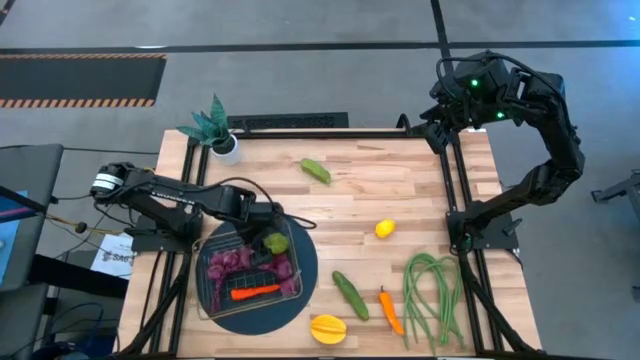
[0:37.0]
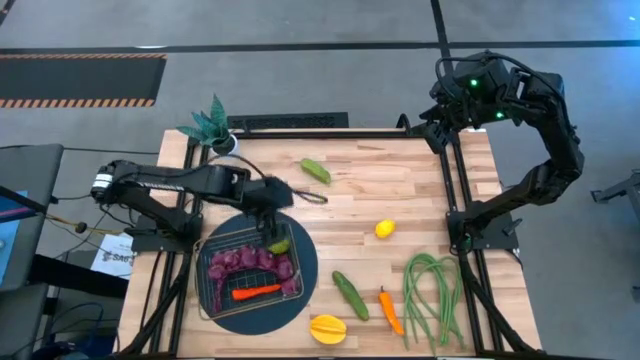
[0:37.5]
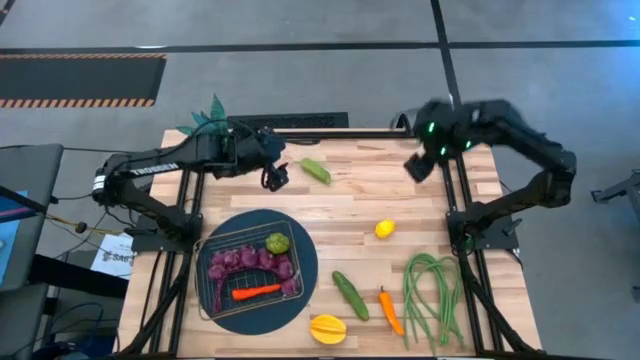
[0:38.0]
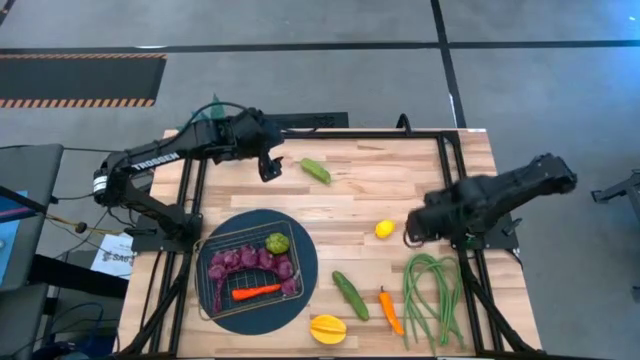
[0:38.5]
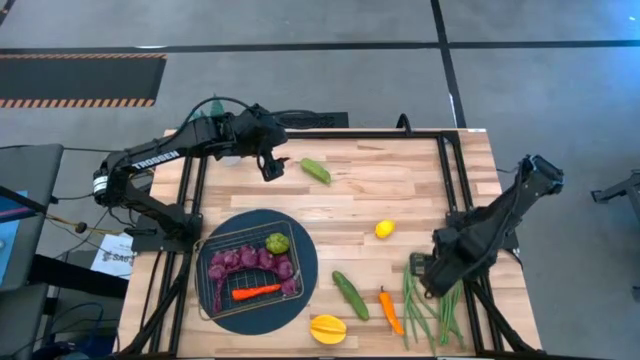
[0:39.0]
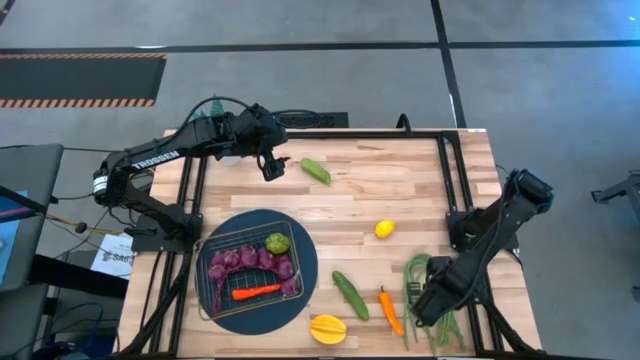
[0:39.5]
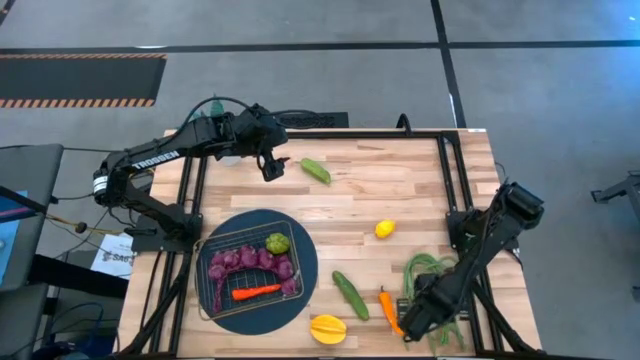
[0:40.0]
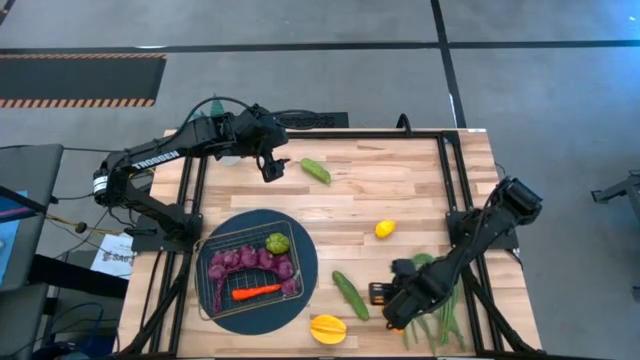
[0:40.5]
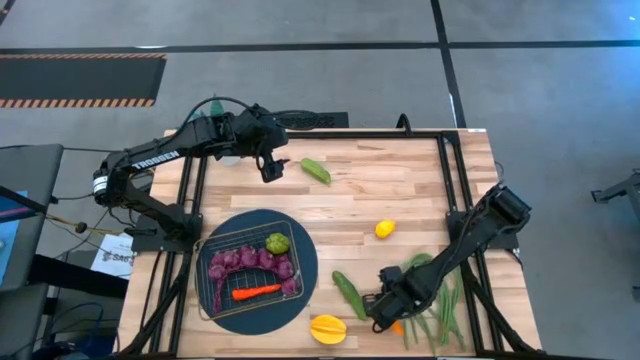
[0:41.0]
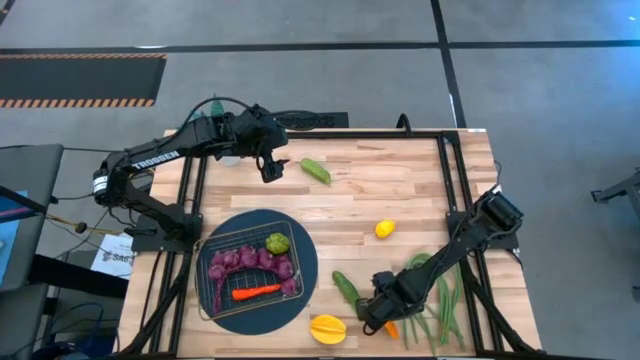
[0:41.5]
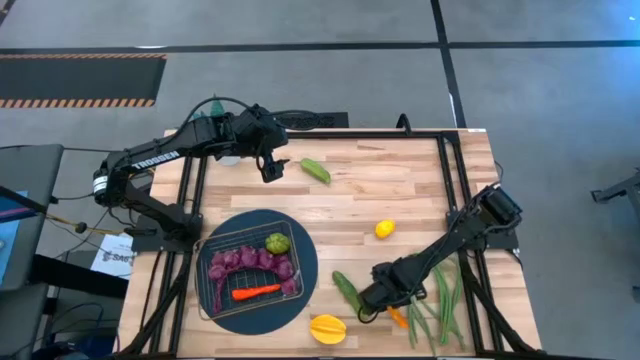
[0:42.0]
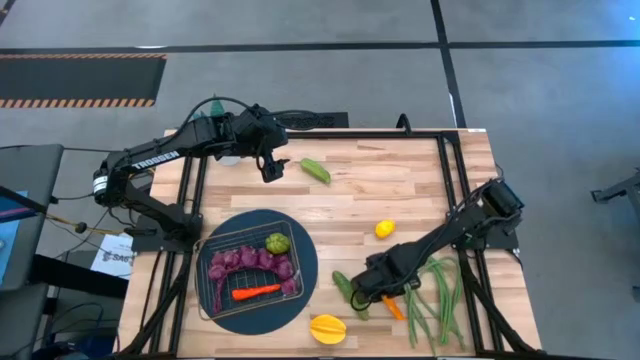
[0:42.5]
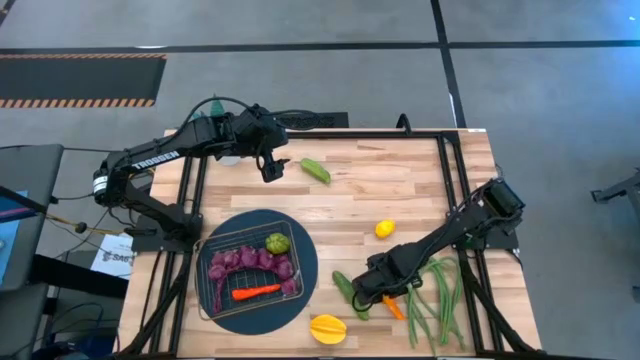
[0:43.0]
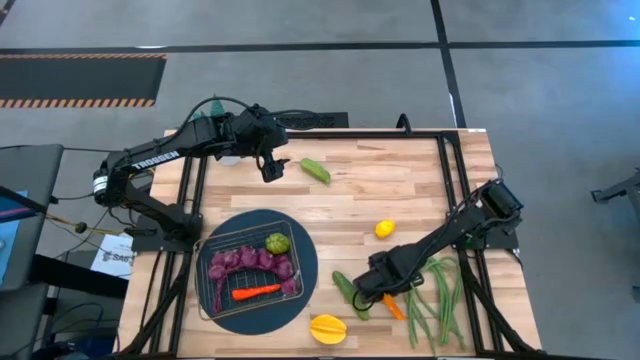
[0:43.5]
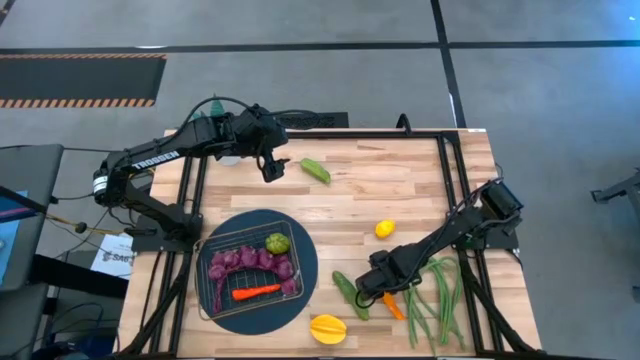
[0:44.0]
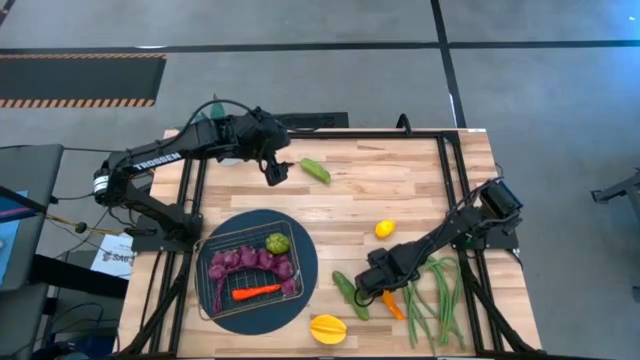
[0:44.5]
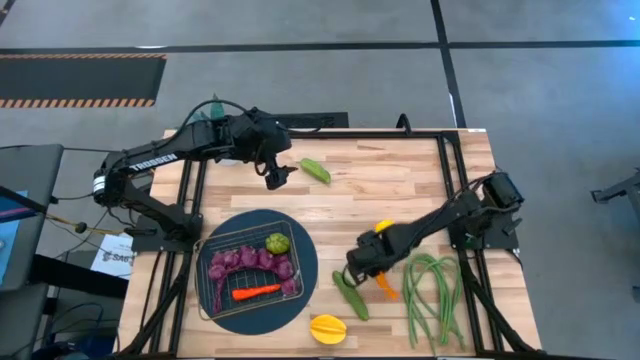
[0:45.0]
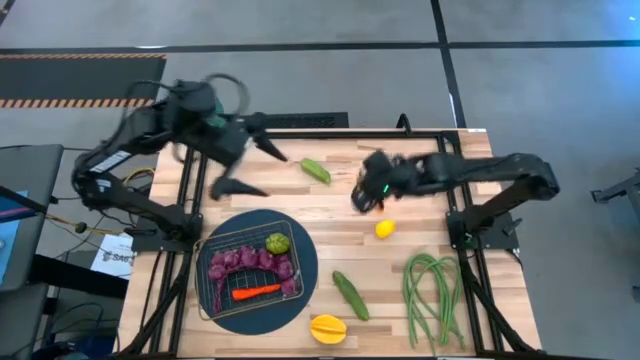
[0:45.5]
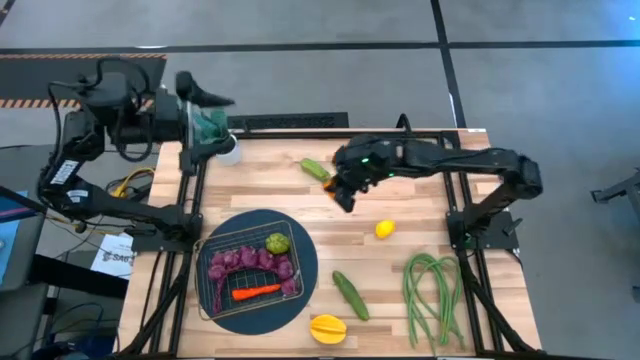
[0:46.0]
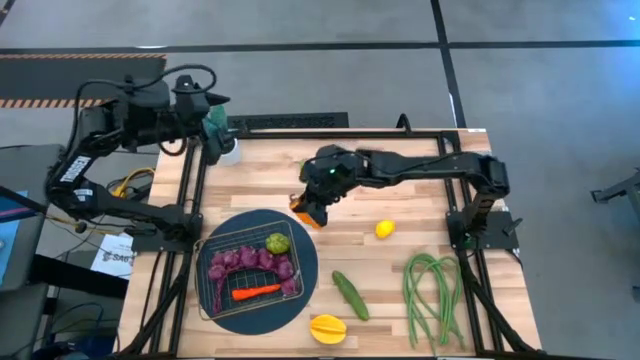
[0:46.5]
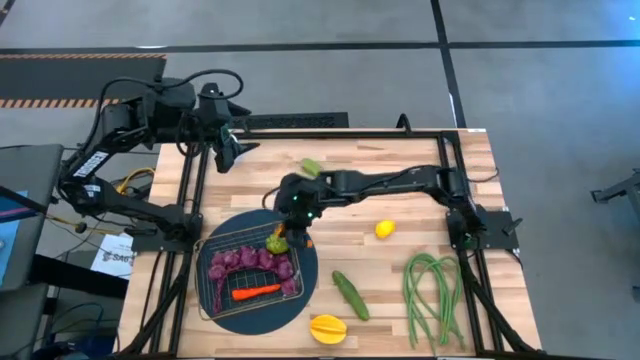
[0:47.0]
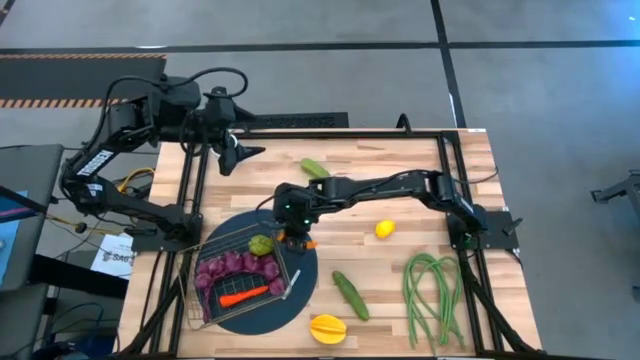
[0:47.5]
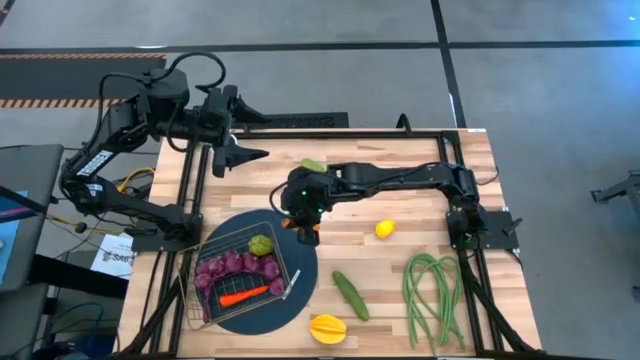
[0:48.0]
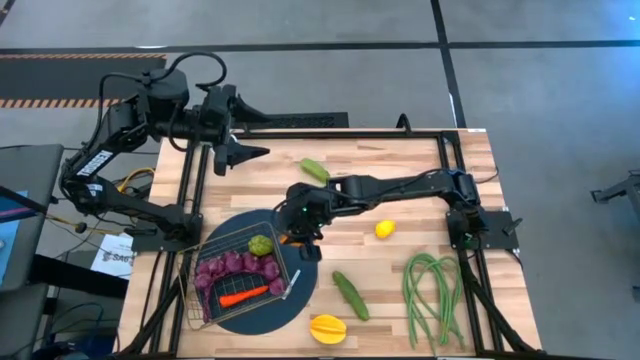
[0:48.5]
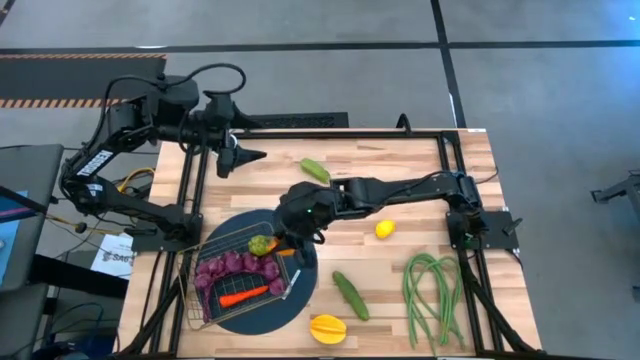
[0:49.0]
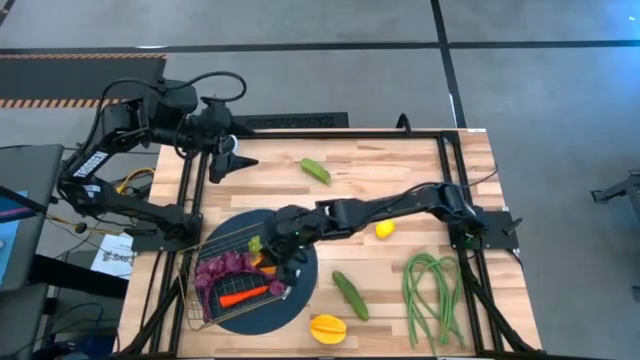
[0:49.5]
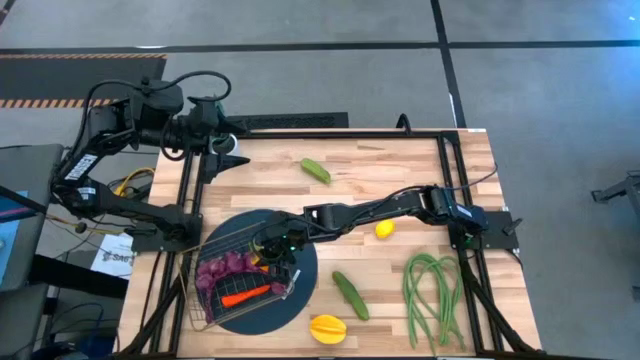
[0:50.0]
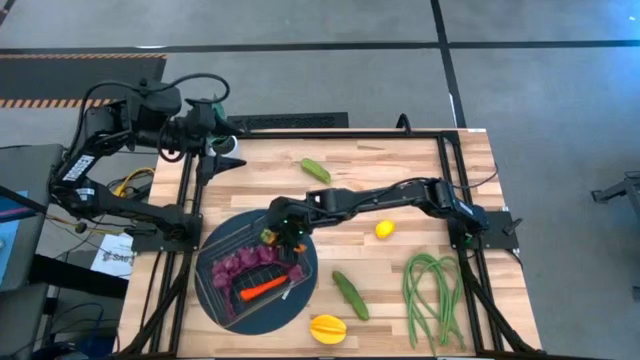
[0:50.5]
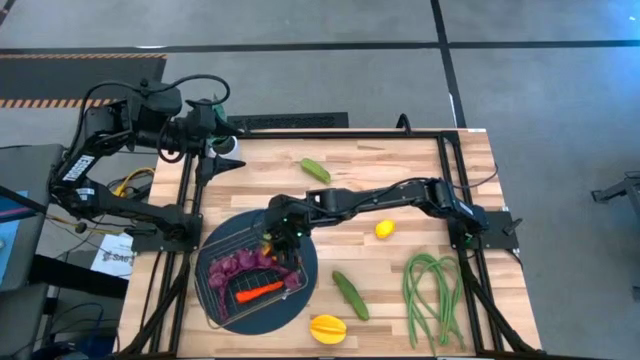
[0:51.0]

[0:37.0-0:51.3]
Task: Build produce basket
Put the orange chili pepper into the wire basket

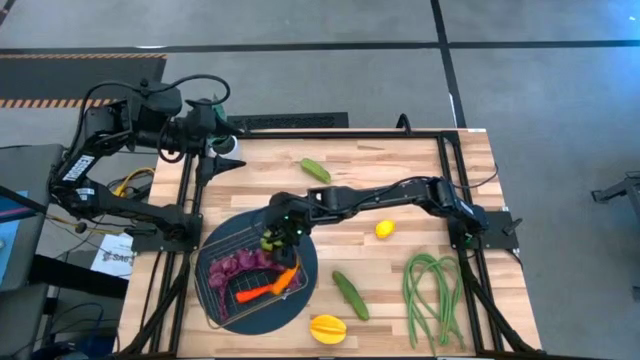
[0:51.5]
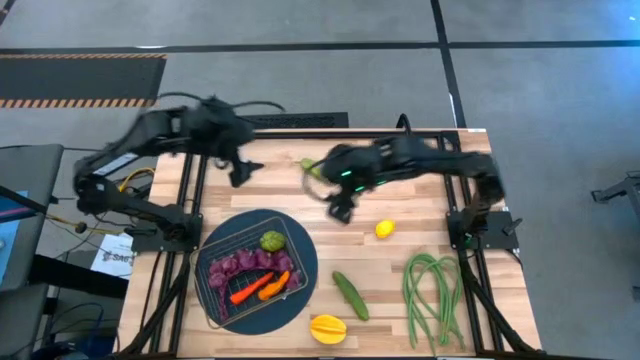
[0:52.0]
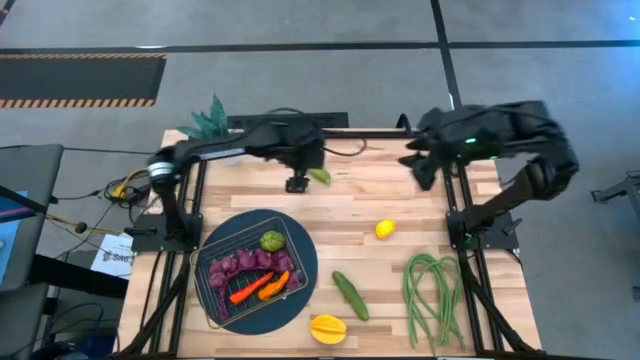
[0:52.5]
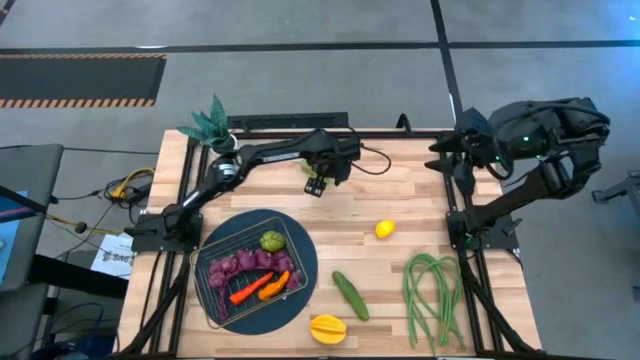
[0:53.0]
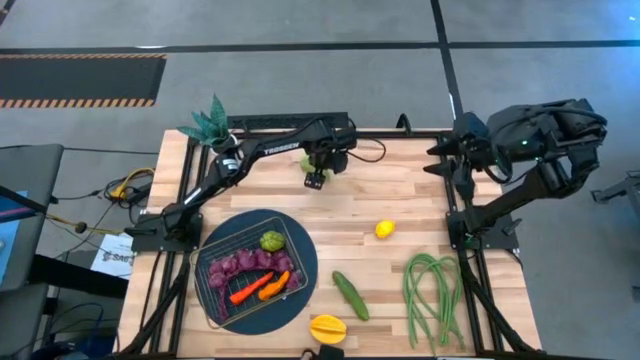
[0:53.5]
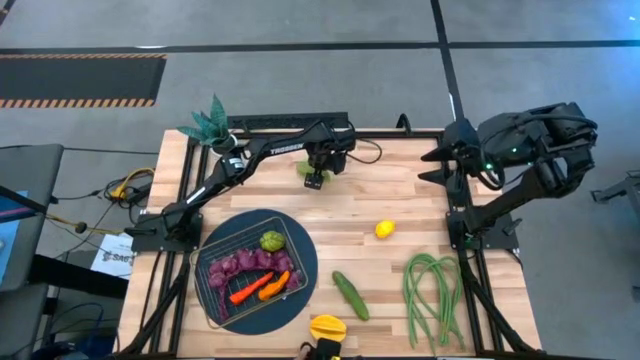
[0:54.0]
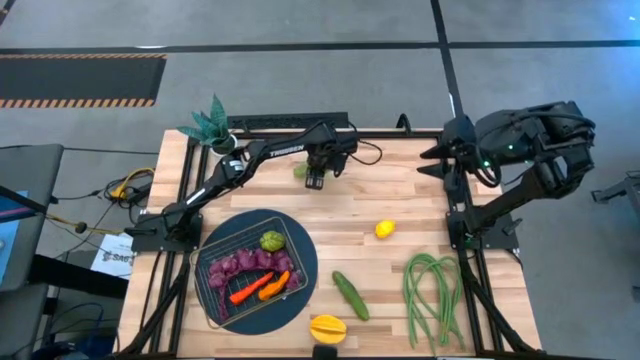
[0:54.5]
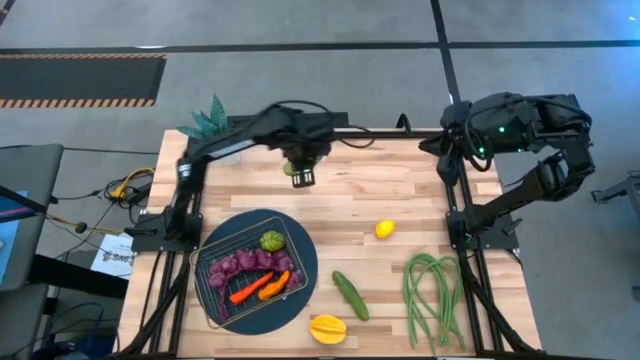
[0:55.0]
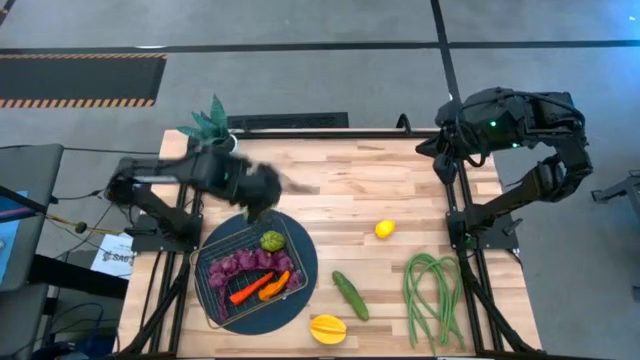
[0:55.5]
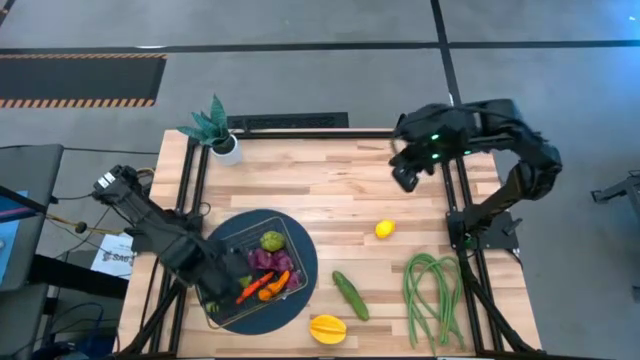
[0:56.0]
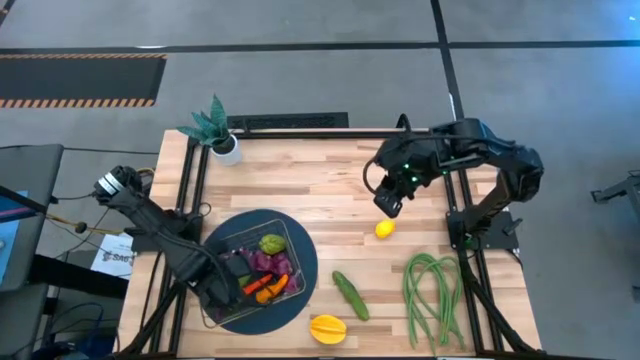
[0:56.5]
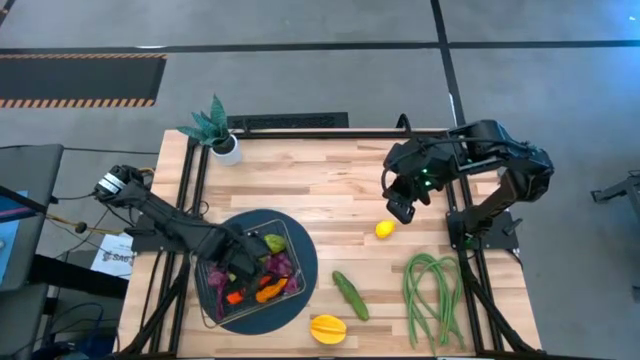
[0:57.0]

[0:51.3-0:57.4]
Put the top green cucumber into the wire basket
